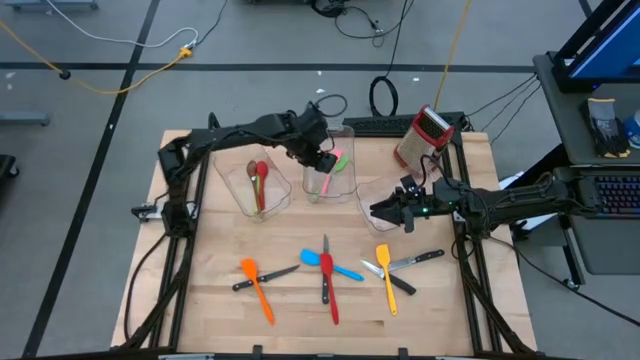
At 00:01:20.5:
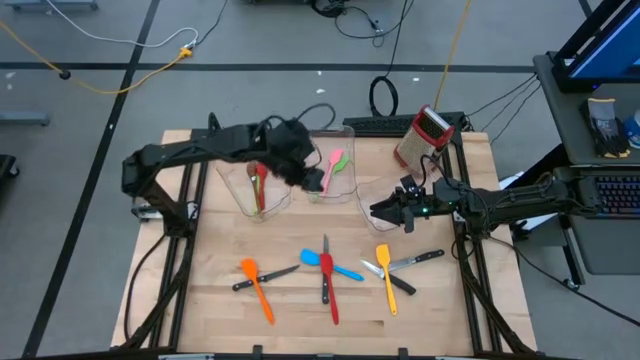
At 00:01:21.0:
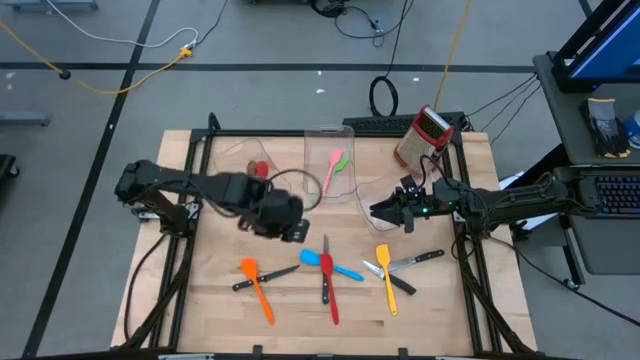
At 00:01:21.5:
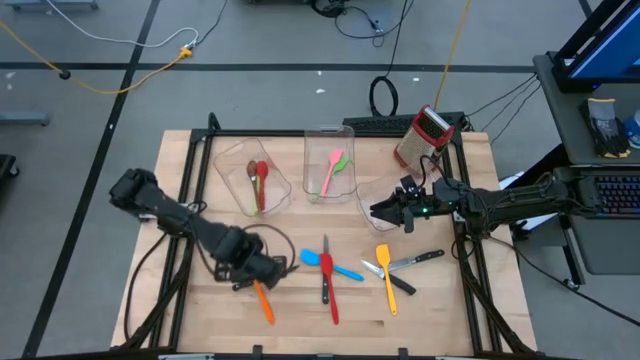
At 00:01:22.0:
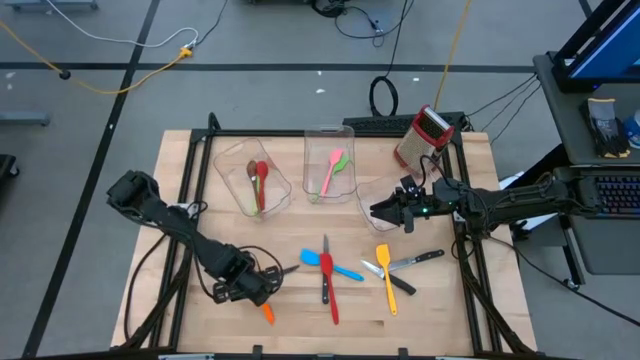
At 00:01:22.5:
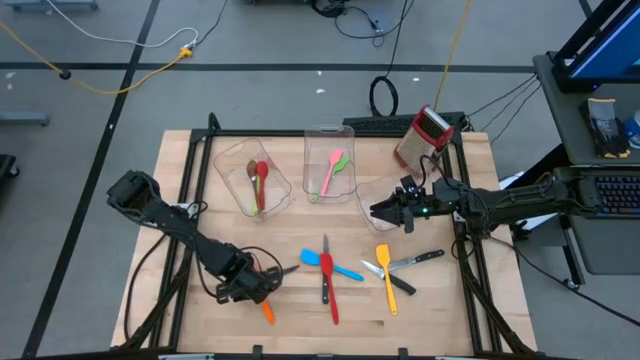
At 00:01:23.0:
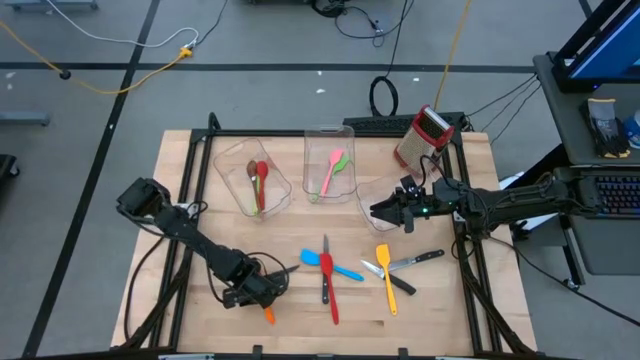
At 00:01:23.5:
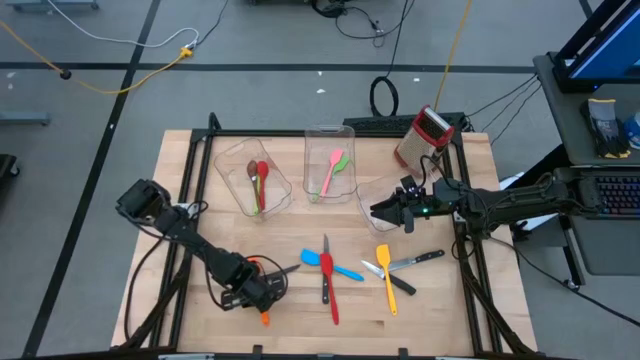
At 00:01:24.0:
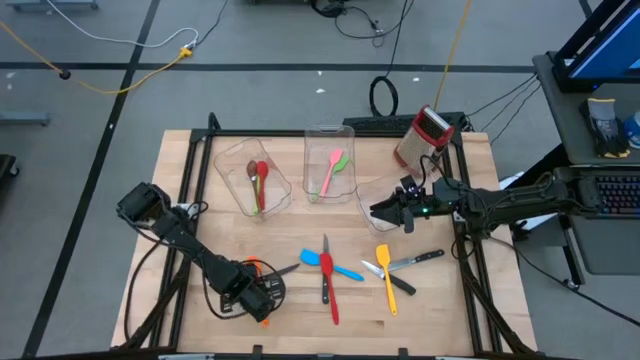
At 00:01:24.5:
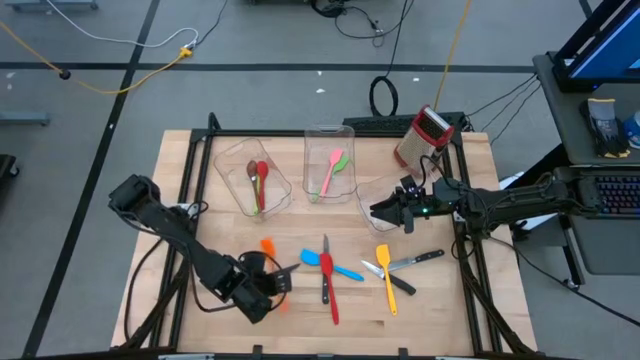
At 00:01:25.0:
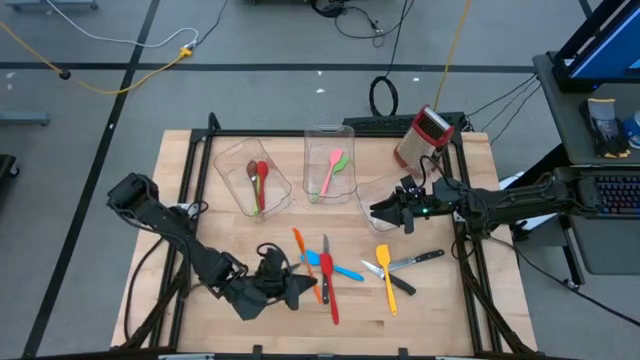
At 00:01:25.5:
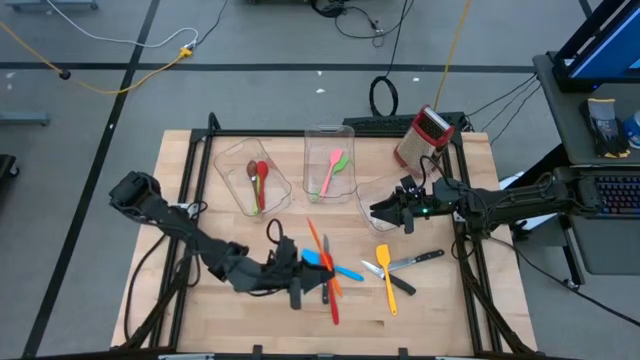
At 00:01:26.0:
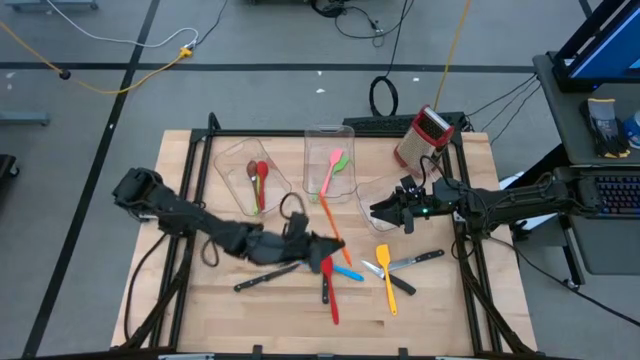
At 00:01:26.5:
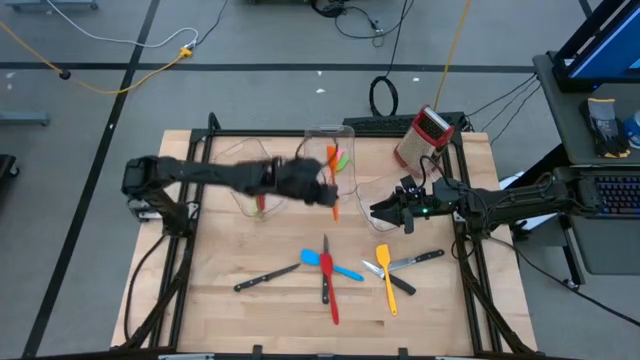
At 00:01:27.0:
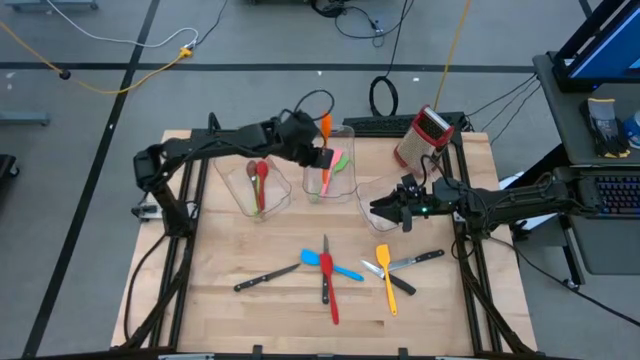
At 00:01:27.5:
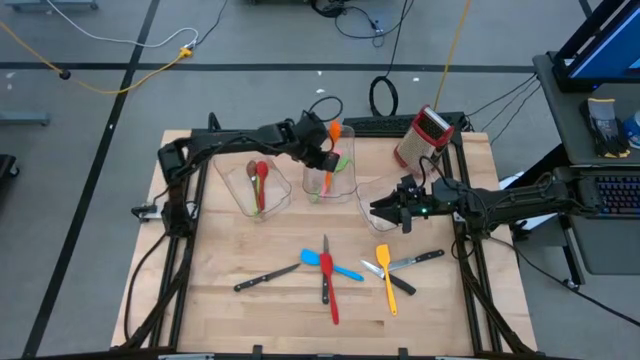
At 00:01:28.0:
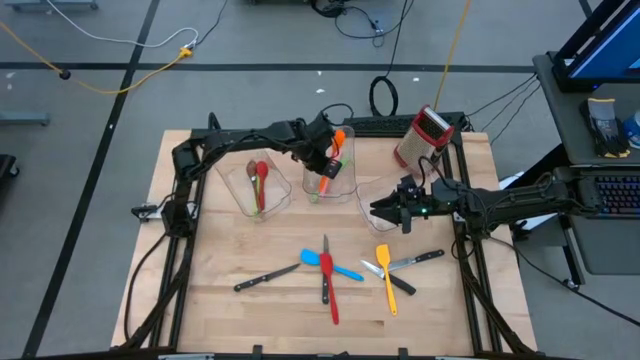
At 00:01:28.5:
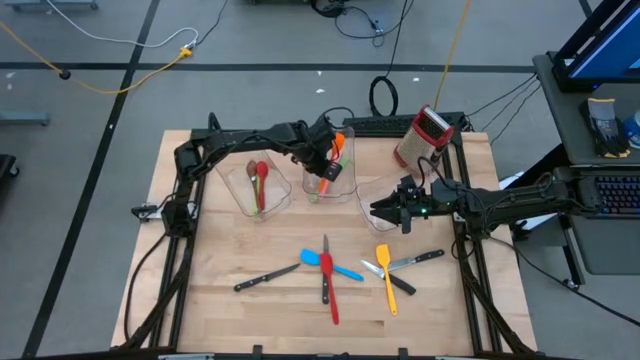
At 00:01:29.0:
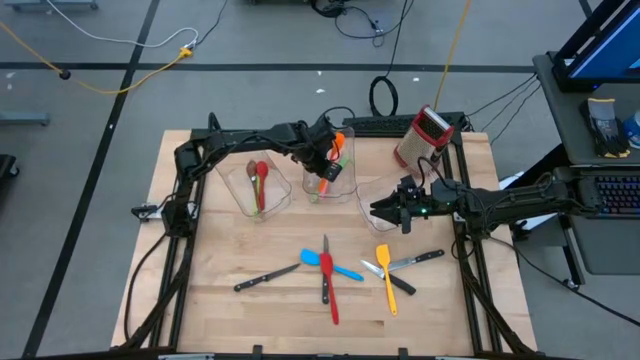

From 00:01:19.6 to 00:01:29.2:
Task: Pick & Place Kitchen Items
Put the orange spatula into the middle bin

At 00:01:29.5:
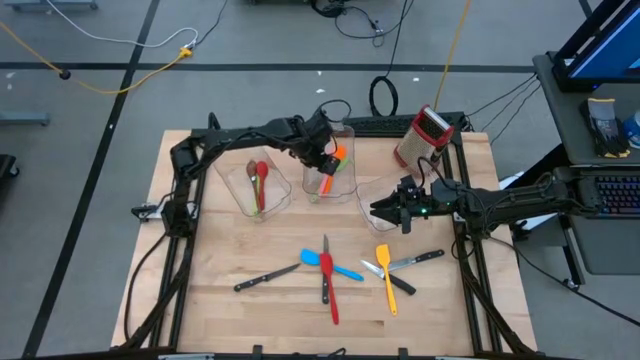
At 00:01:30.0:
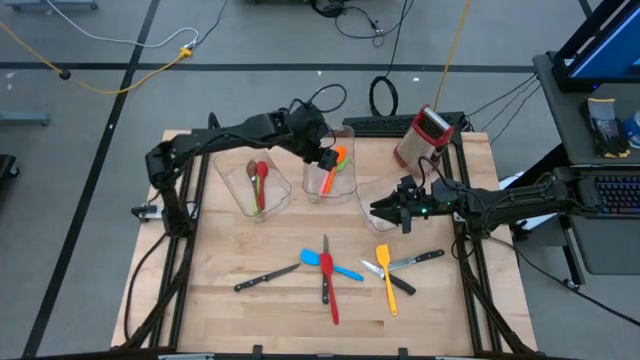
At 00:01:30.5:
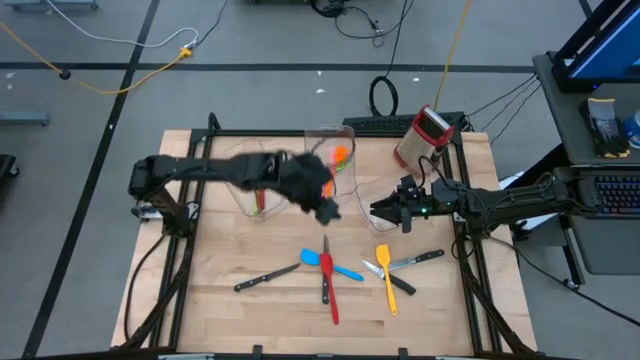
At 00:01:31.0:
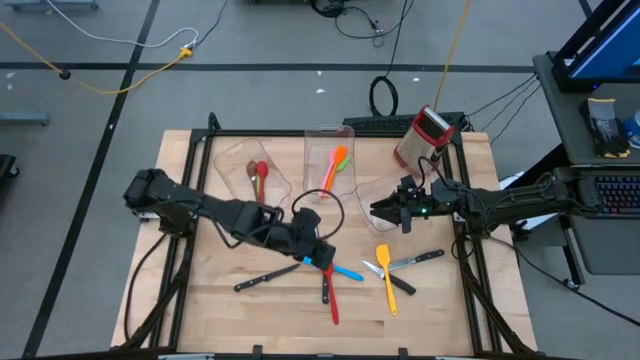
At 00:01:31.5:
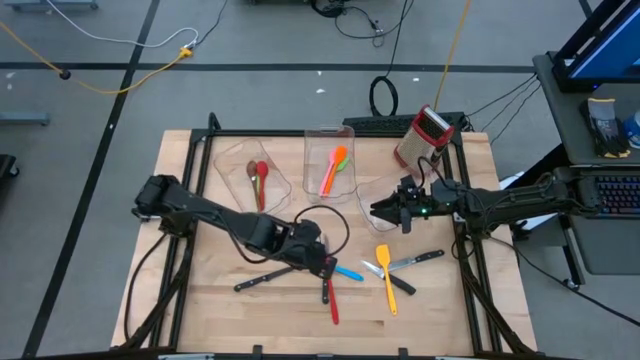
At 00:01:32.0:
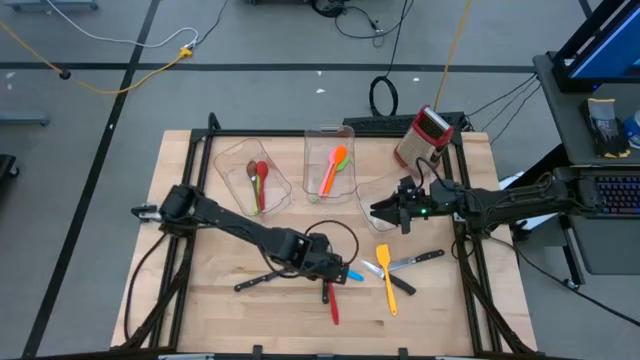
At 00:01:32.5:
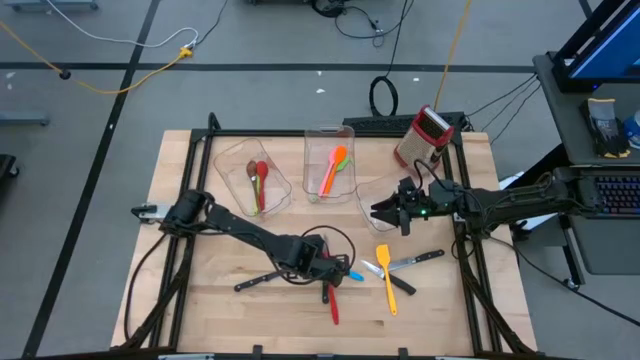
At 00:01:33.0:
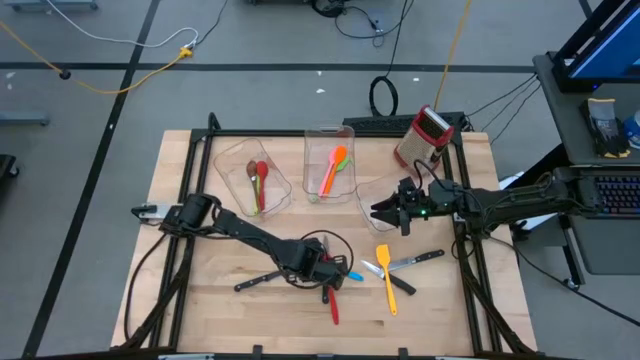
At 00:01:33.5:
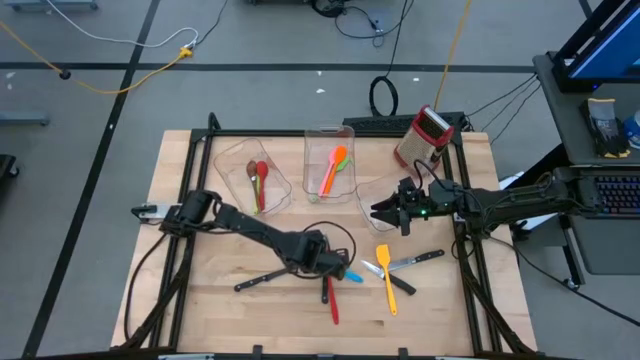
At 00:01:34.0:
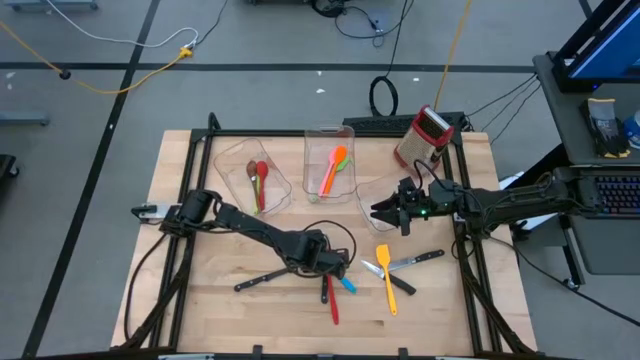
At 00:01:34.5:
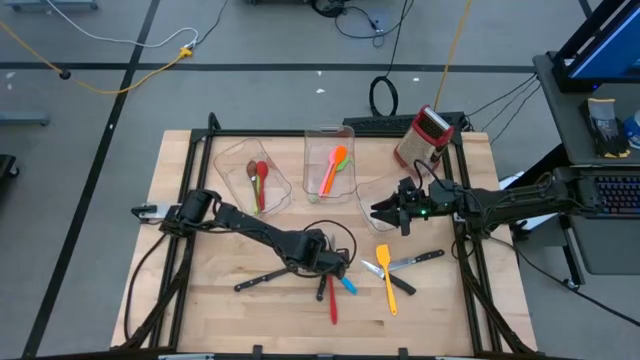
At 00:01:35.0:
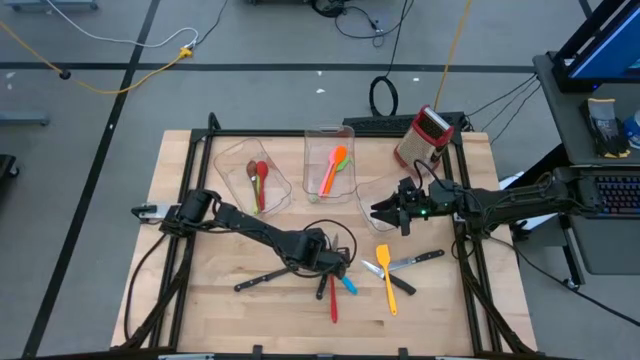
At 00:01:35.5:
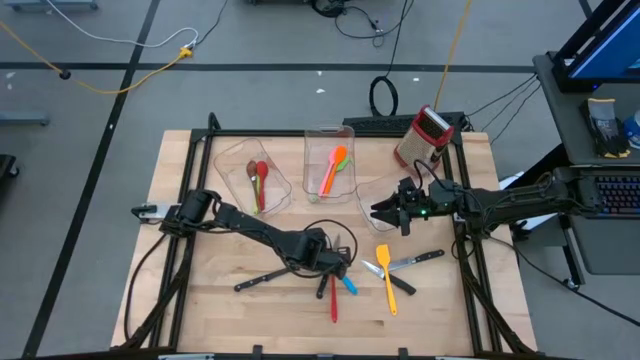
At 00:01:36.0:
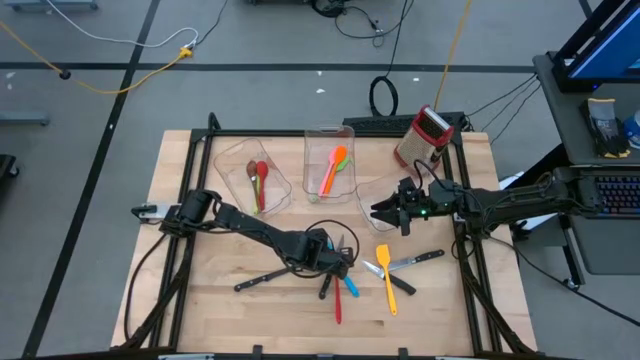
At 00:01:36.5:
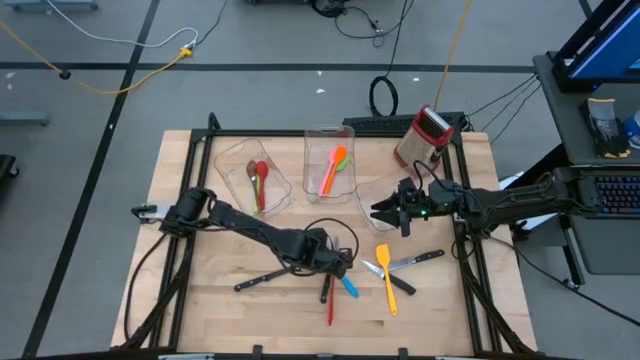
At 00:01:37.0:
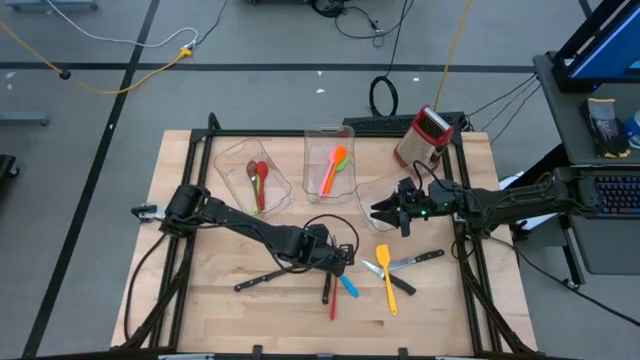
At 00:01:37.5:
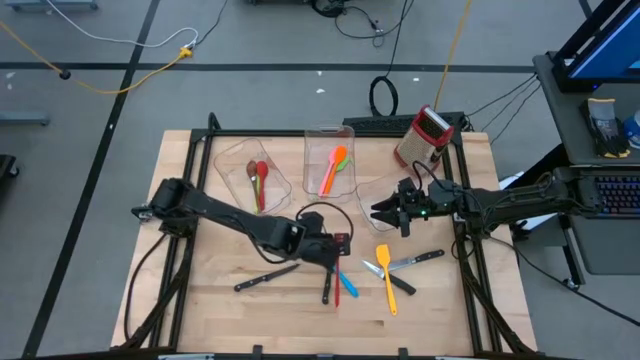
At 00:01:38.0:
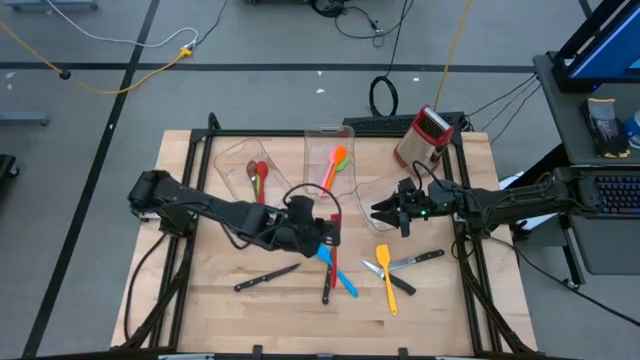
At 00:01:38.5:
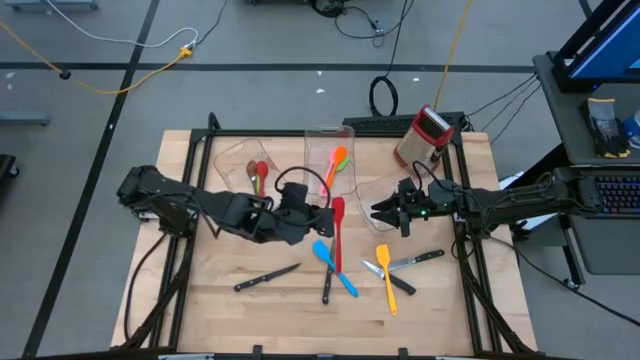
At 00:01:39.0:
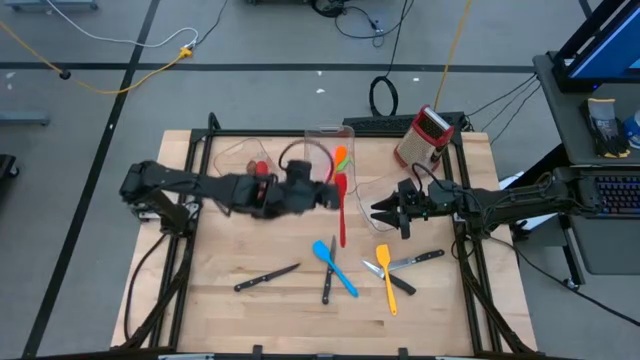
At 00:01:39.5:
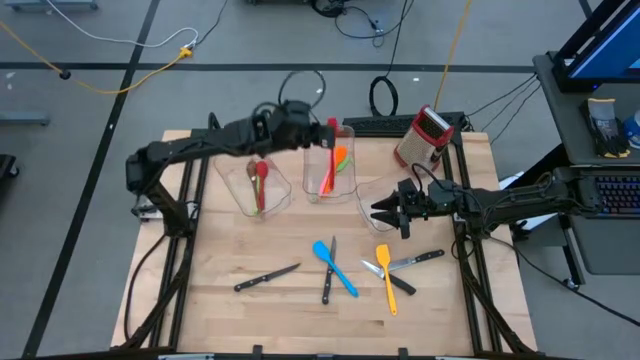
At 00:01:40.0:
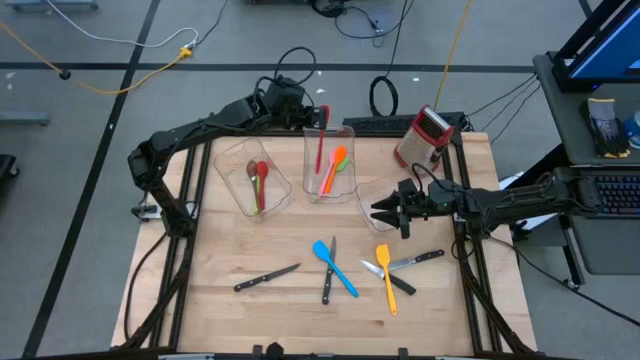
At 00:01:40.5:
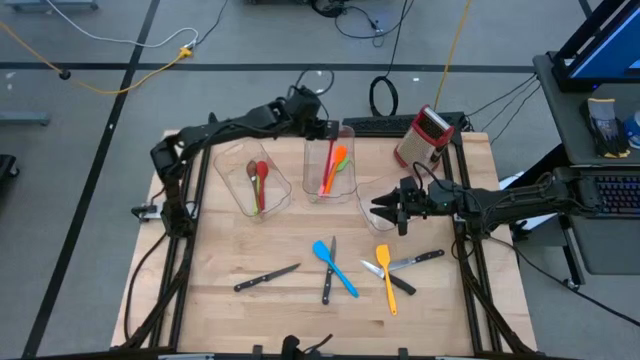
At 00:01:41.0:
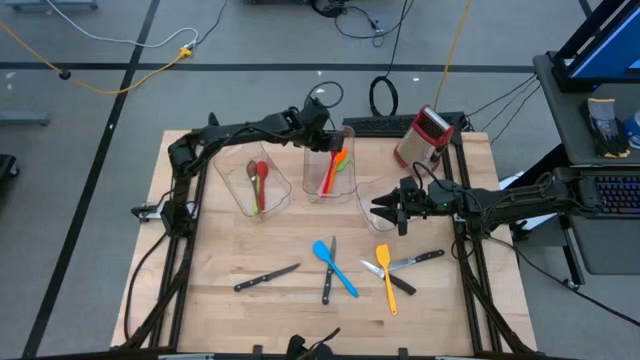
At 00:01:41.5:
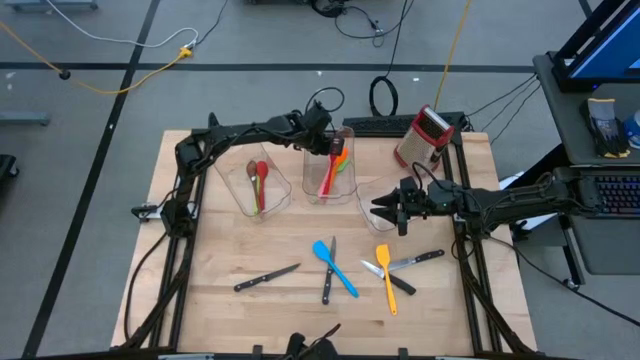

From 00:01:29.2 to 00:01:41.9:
Put the red silicone spatula into the middle bin
